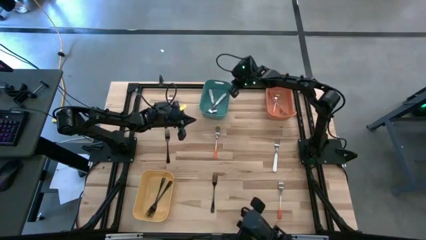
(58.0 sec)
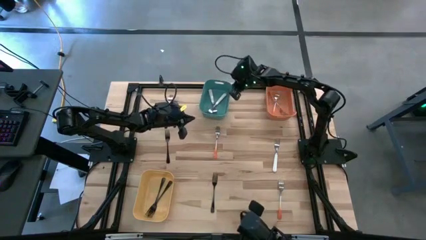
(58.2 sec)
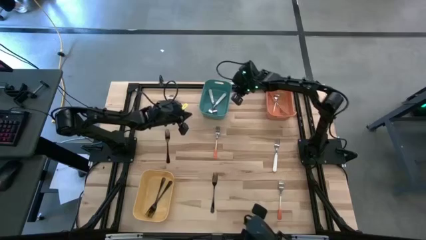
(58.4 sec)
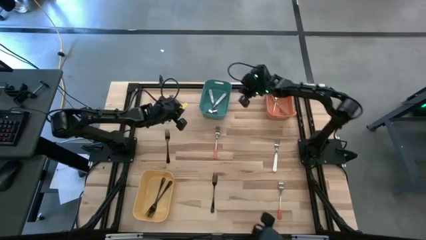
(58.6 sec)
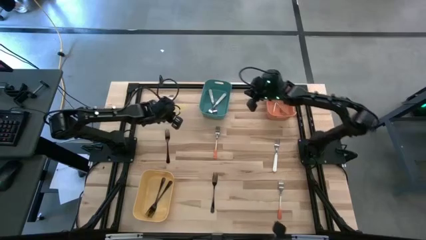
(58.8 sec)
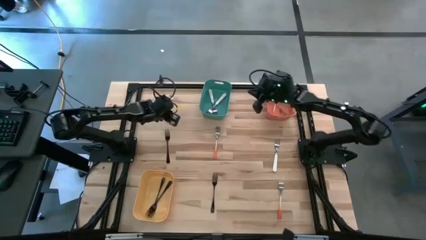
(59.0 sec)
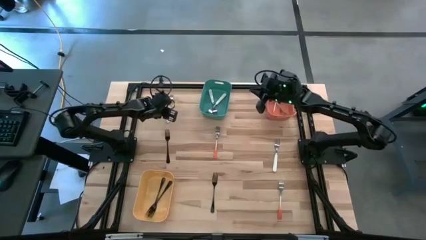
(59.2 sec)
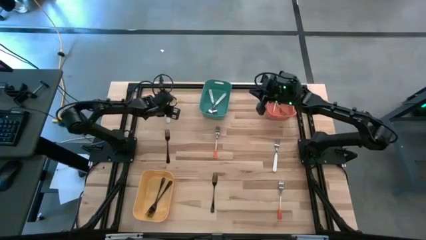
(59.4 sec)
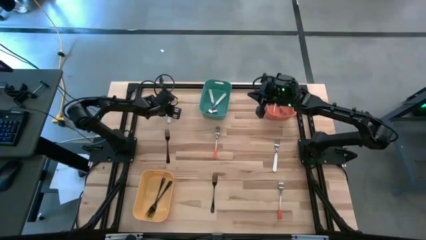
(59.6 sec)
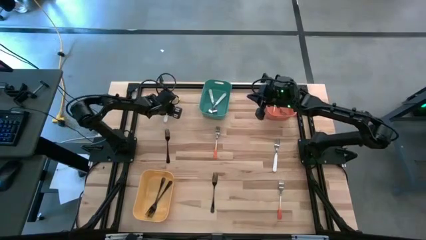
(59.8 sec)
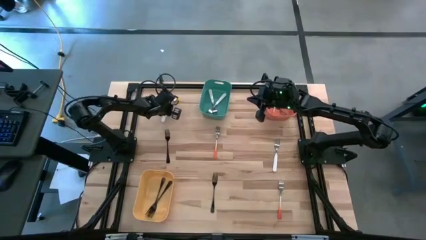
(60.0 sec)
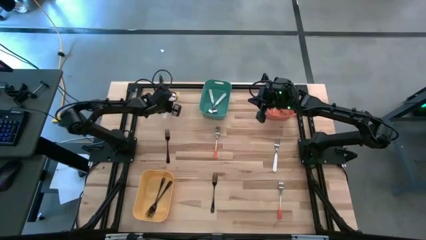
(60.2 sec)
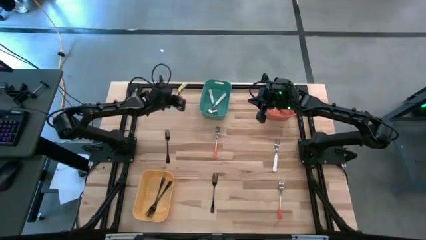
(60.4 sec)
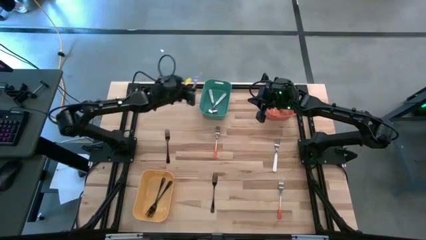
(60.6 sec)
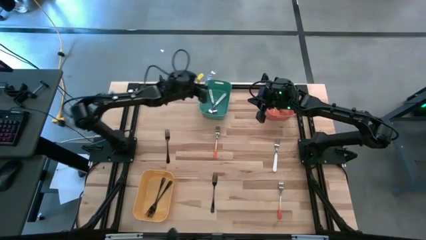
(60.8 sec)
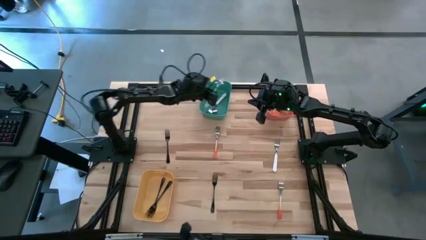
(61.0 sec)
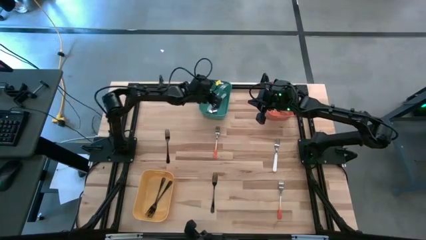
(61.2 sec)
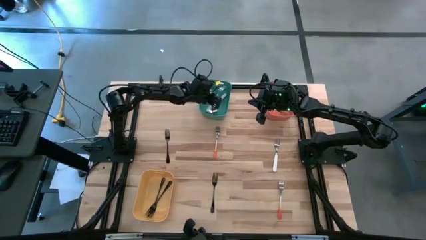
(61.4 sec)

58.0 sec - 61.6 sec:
Task: Sort silverware by color (type)
Put the white fork into the green bin

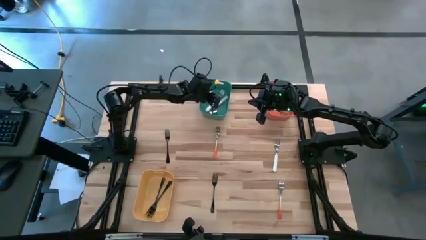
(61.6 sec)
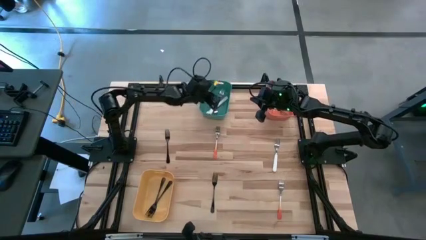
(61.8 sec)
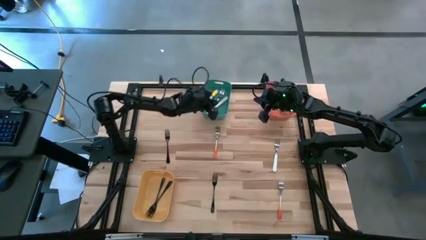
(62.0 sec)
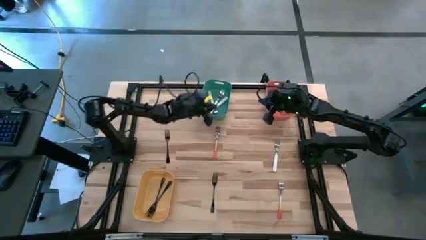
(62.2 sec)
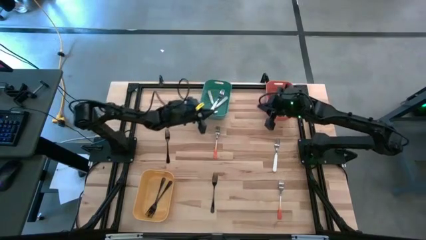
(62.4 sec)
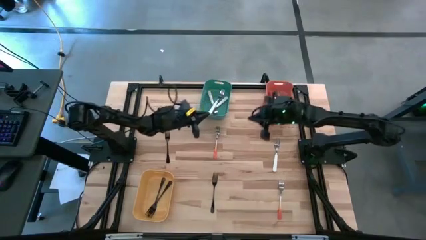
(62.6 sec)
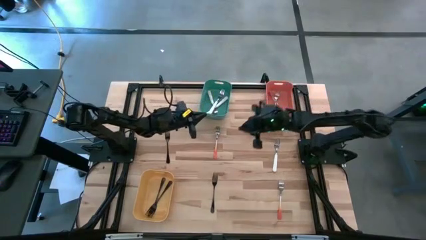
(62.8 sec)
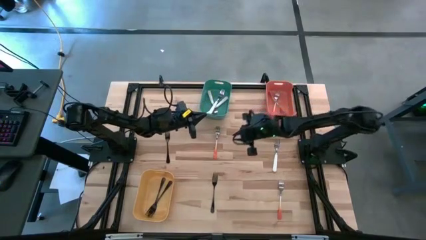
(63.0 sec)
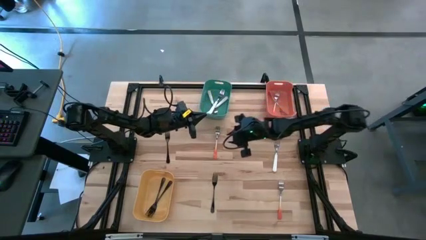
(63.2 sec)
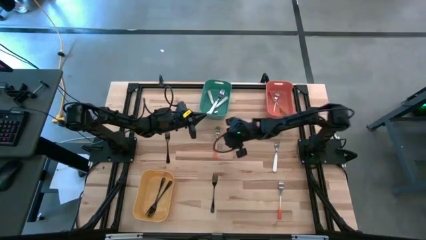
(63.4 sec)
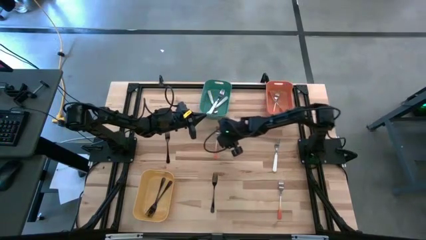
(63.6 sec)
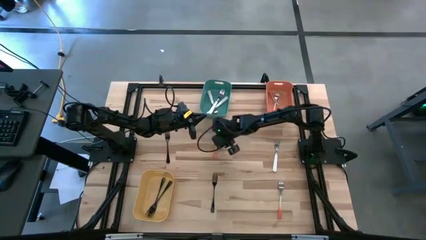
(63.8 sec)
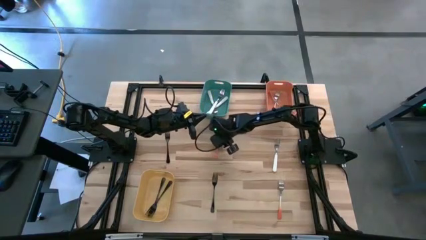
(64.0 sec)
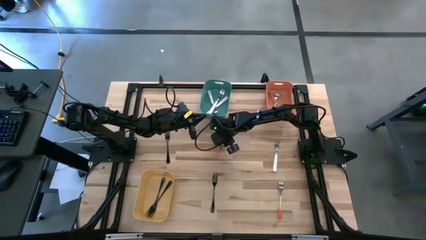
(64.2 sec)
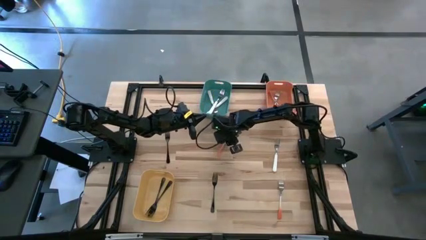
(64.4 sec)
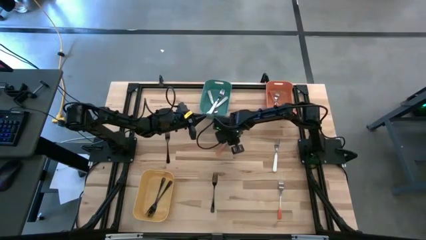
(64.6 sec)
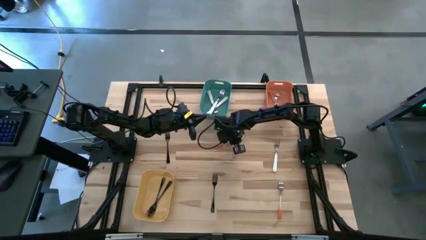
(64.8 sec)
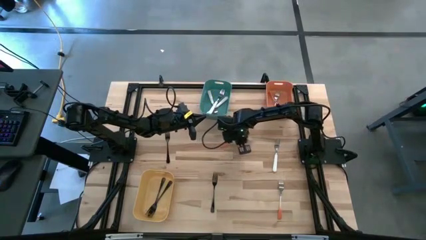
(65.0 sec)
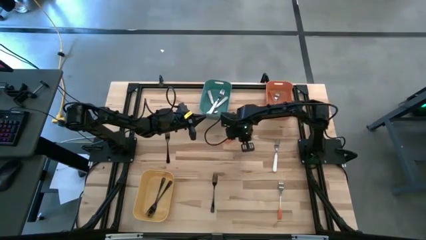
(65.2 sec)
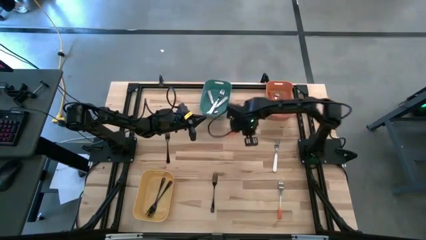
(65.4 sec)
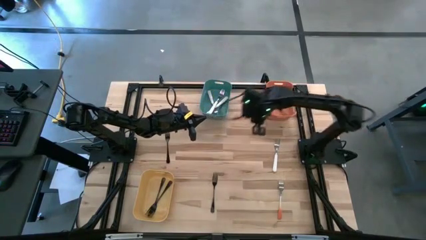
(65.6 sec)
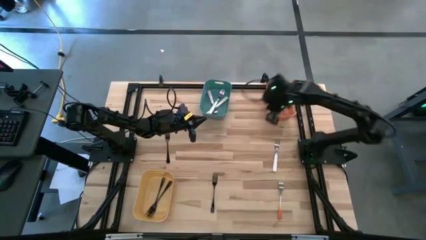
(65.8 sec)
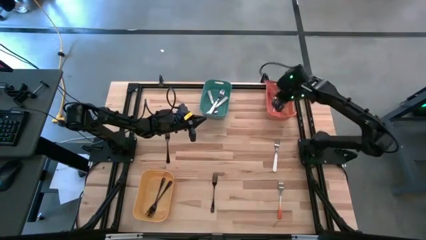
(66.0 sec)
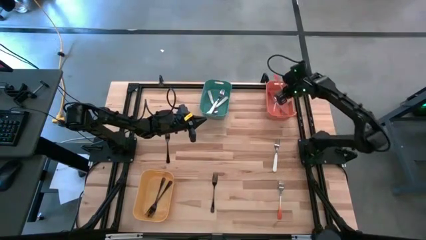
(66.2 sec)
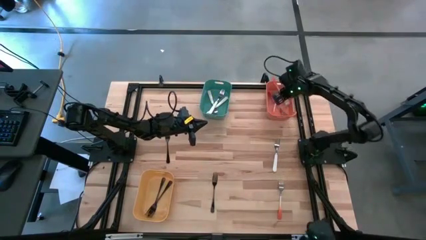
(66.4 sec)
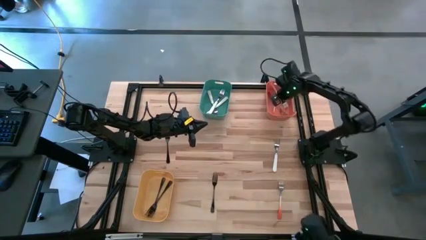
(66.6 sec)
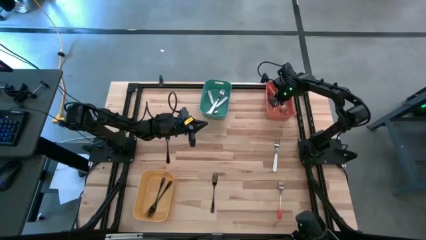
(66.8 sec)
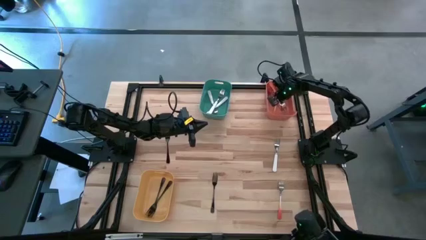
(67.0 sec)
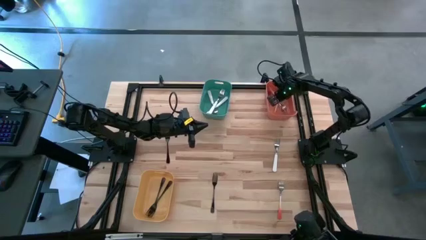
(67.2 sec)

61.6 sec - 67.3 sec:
Put the orange fork into the orange bin

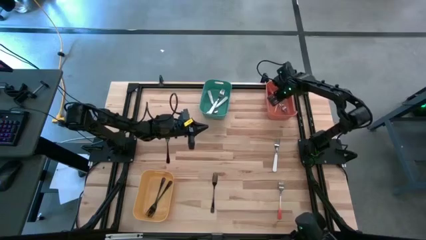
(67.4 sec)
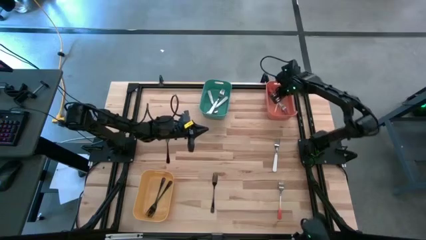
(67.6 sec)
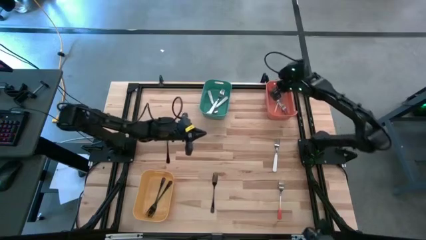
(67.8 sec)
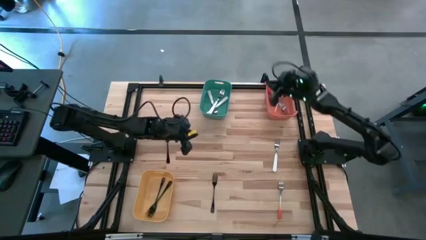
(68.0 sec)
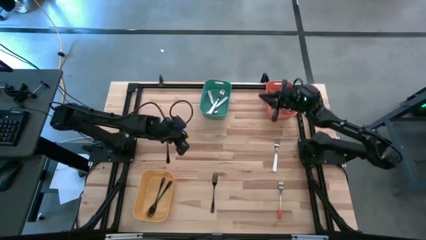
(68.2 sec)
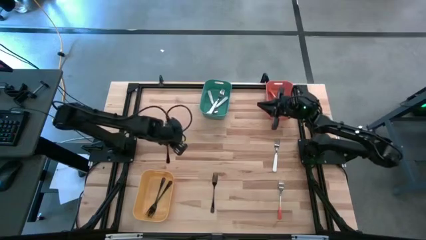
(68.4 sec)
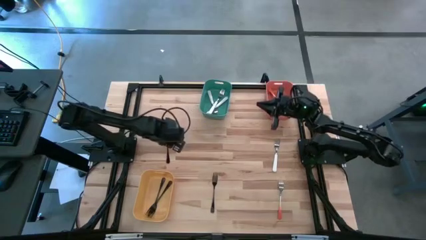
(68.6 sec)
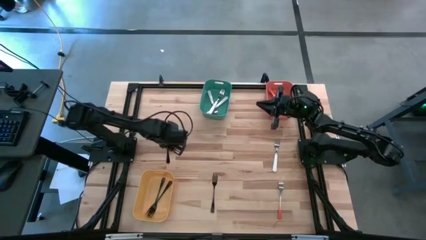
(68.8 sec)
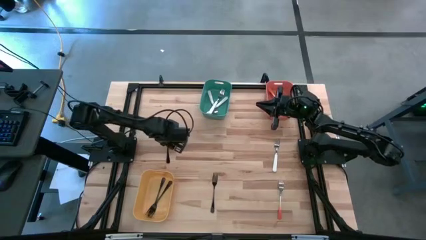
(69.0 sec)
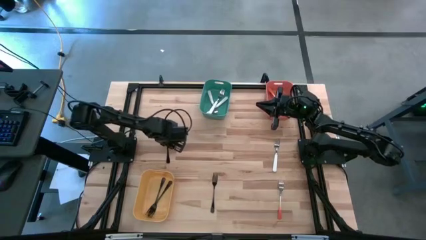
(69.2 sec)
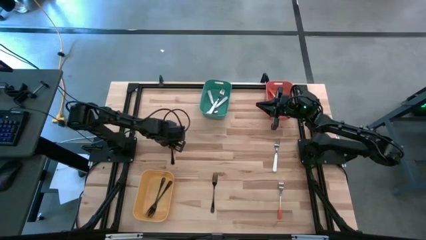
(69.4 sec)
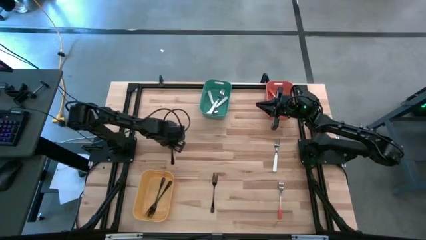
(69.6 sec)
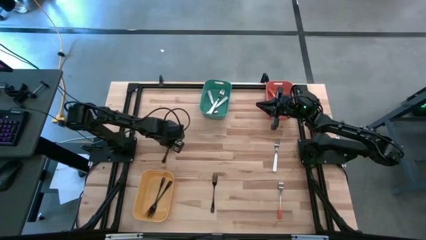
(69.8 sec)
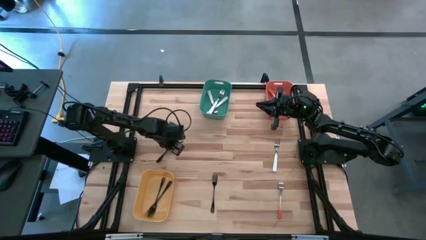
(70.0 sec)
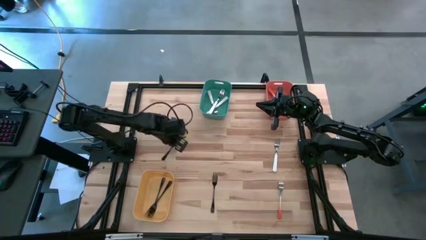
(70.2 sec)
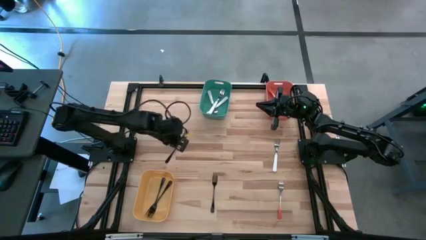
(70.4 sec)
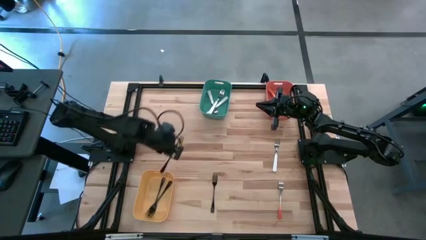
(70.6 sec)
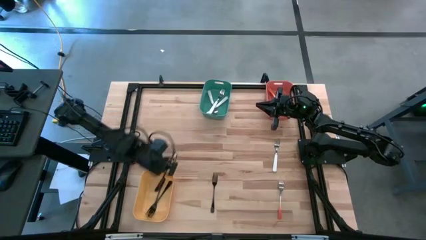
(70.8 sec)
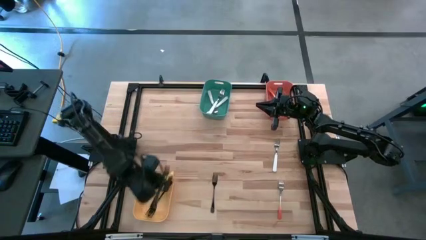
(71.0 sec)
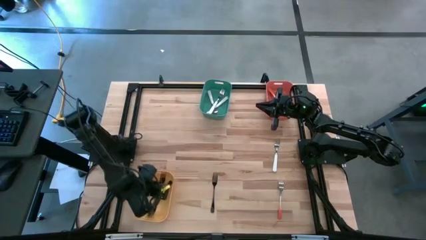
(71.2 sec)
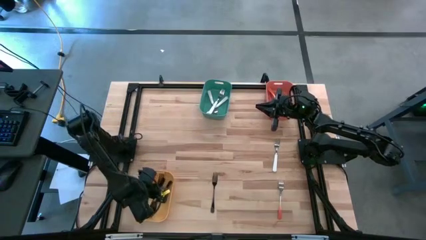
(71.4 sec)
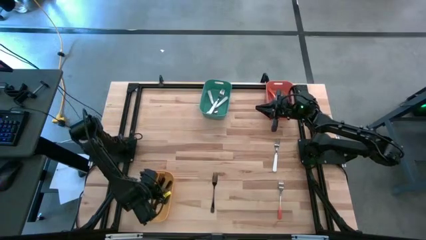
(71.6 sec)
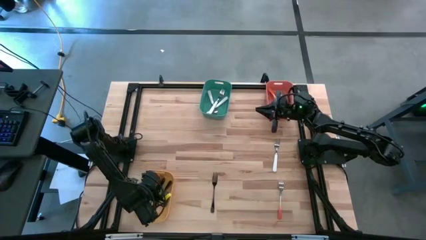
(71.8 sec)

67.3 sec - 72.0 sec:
Put the black fork into the yellow bin

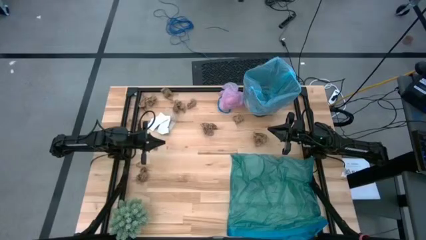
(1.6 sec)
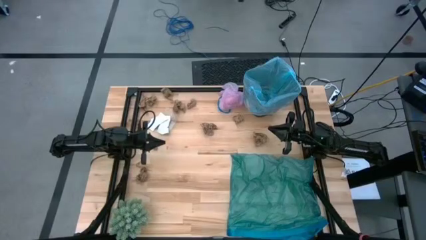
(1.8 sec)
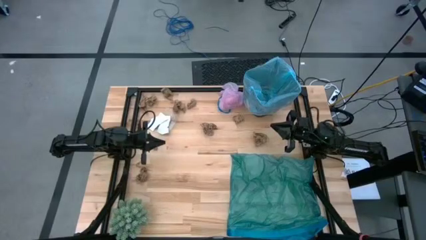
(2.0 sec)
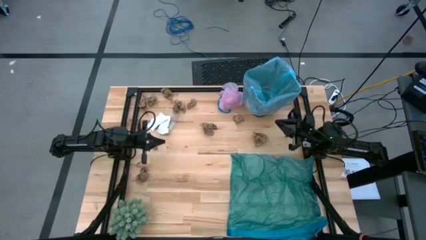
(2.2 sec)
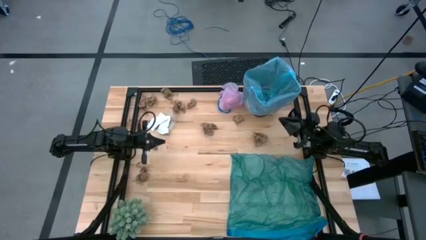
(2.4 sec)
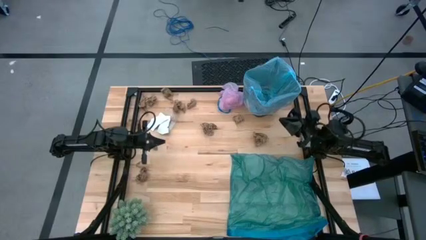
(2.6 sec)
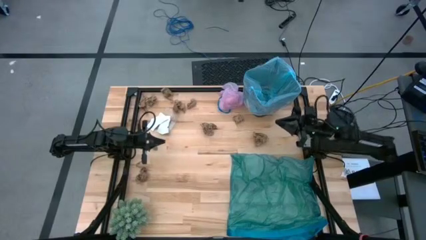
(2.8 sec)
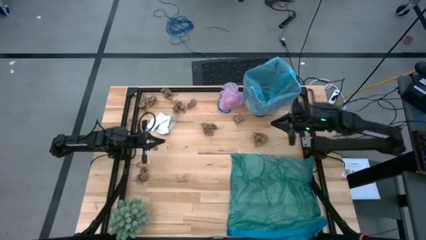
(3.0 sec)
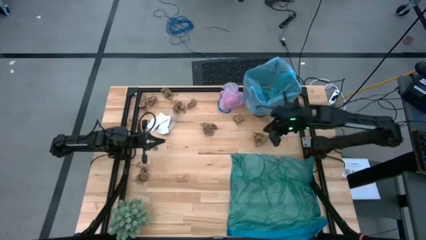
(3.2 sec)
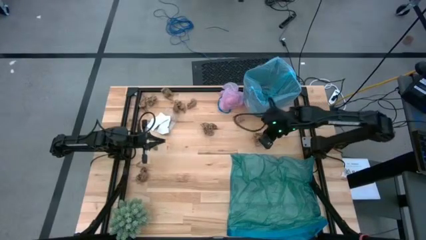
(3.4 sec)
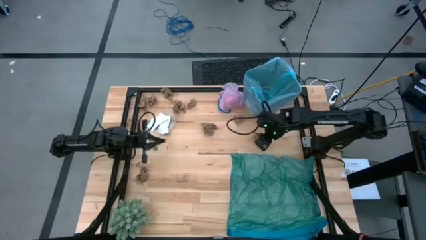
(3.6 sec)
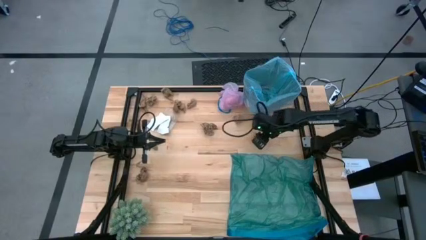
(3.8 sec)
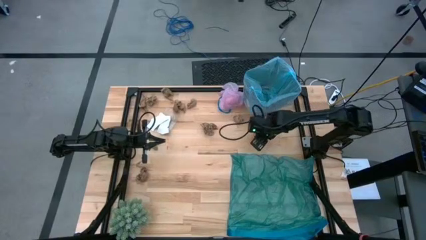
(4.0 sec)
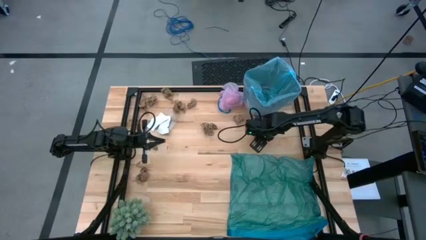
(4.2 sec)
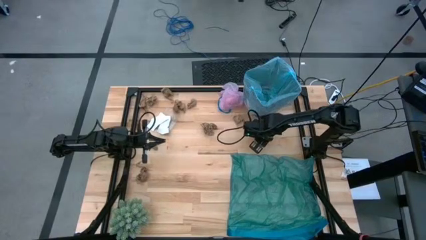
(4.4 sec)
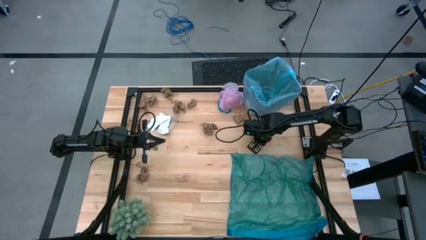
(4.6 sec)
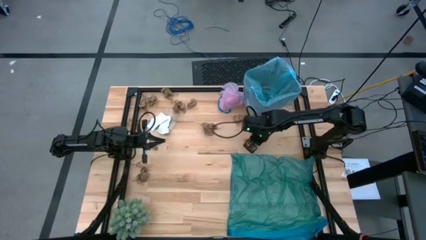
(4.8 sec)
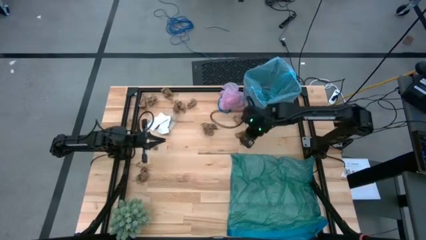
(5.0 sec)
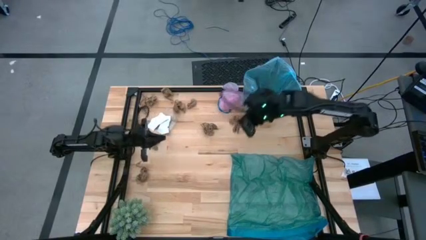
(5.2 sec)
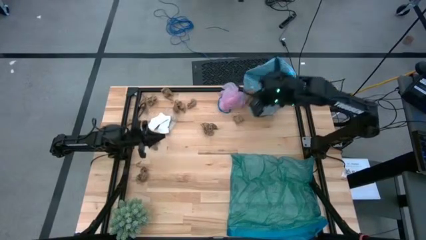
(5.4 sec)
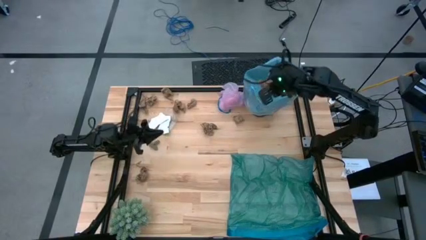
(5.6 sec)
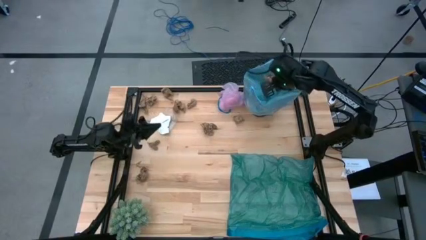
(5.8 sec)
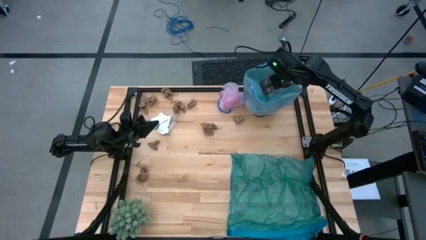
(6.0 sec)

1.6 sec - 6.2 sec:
Task: place trash/remove bag and relplace
Put the brown napkin into the black trash bin
